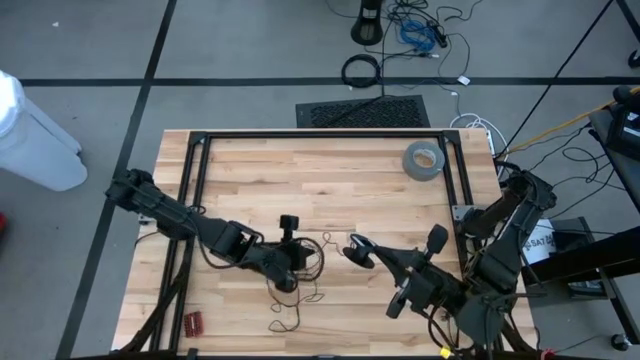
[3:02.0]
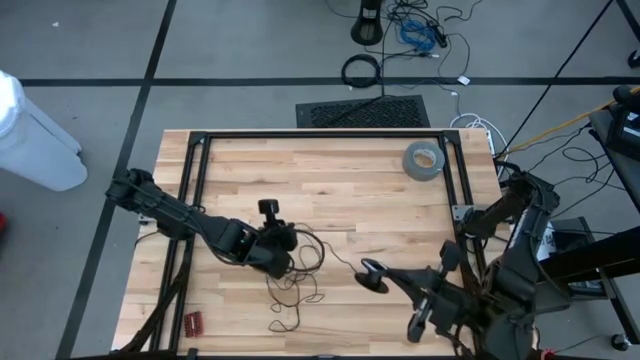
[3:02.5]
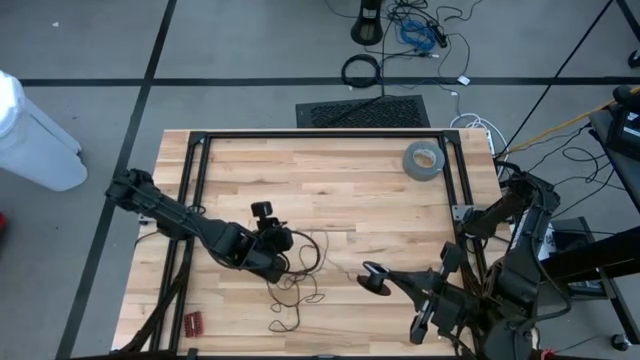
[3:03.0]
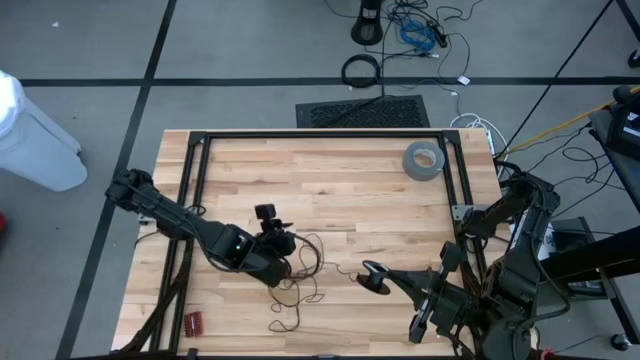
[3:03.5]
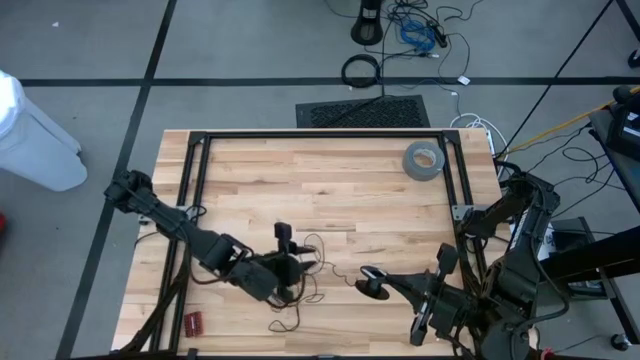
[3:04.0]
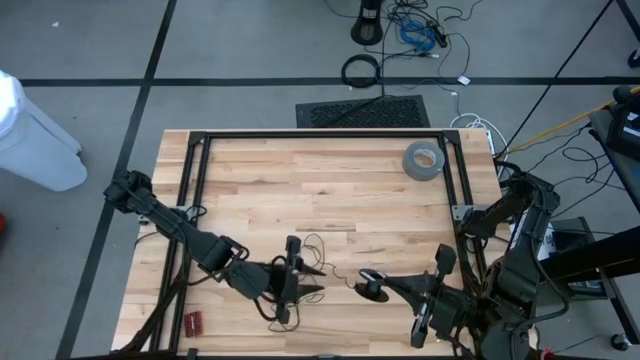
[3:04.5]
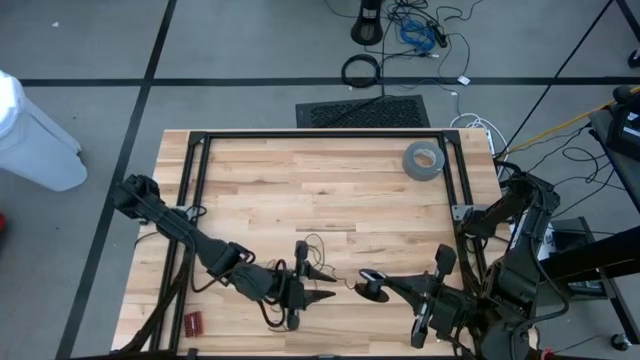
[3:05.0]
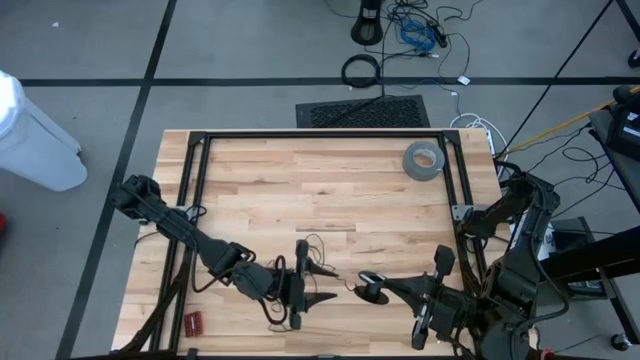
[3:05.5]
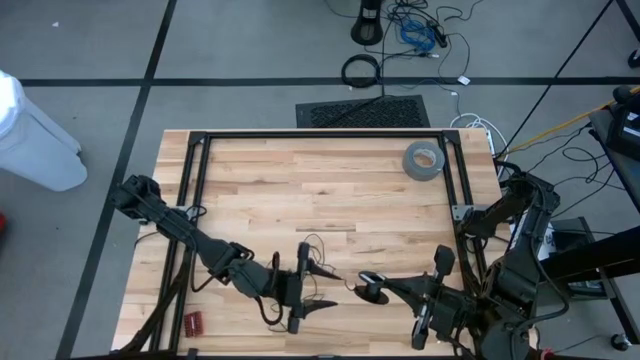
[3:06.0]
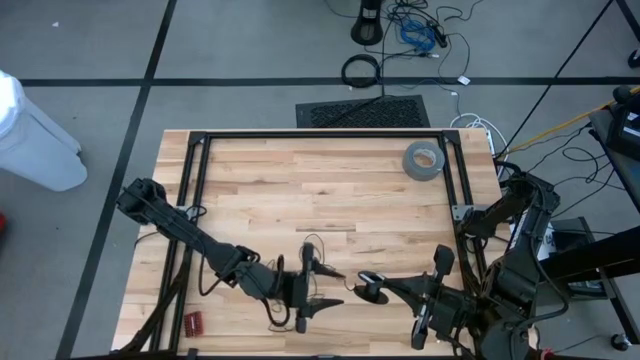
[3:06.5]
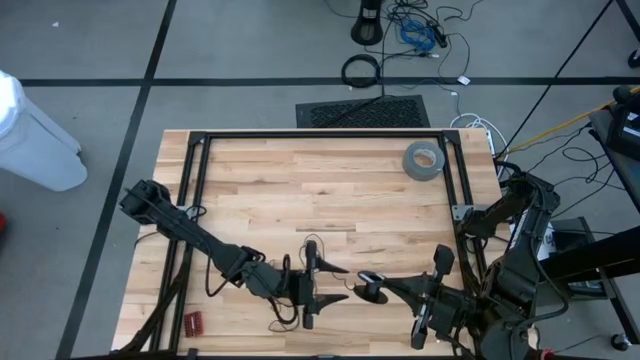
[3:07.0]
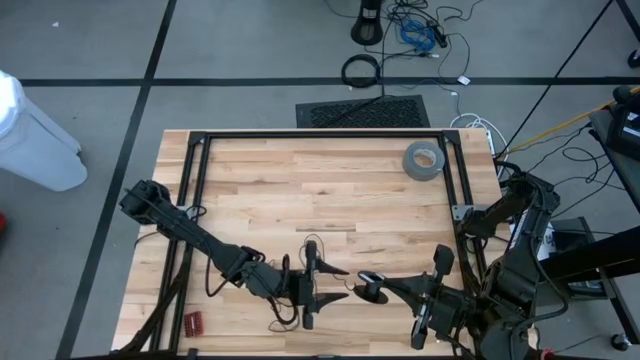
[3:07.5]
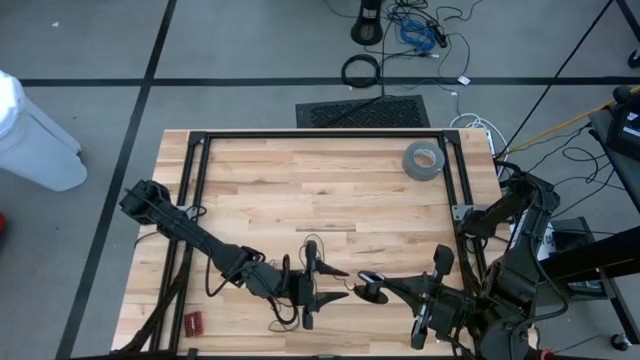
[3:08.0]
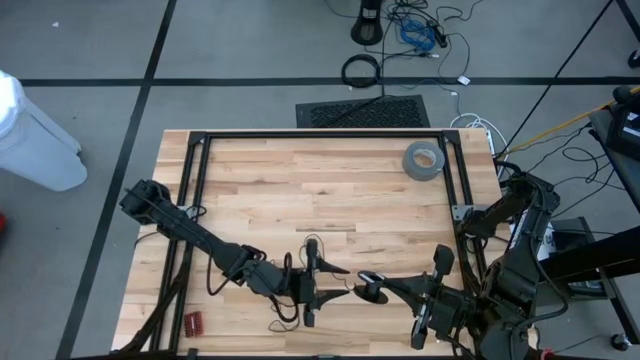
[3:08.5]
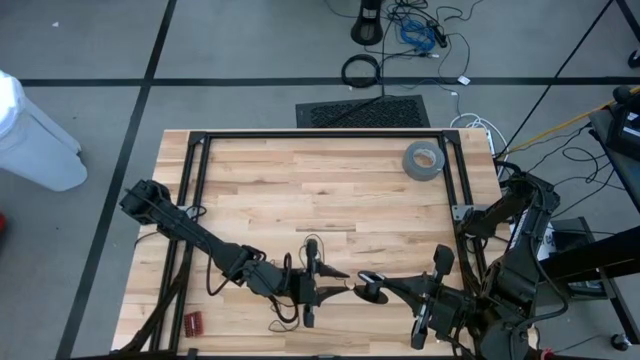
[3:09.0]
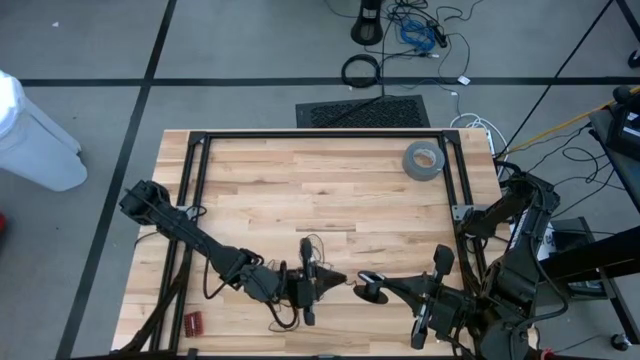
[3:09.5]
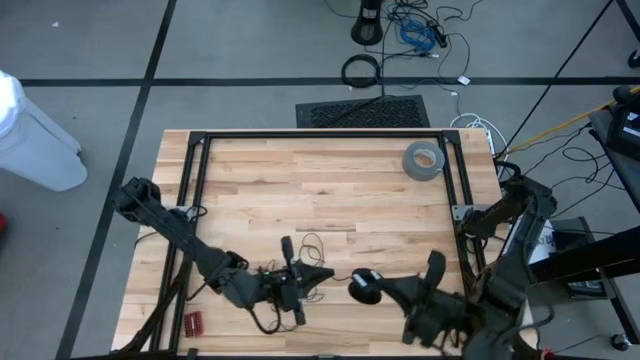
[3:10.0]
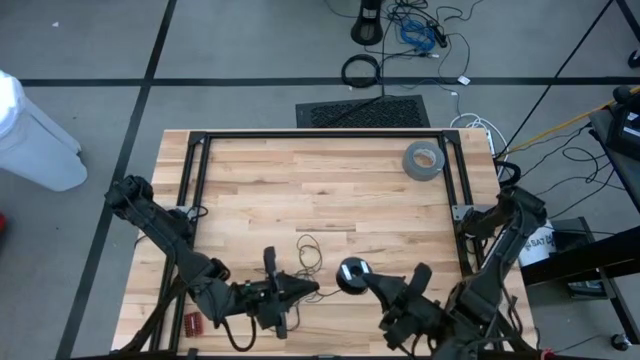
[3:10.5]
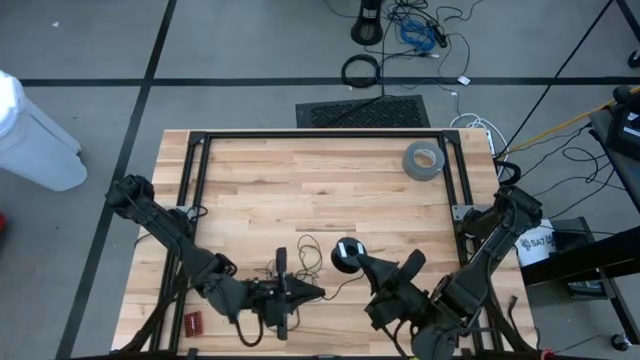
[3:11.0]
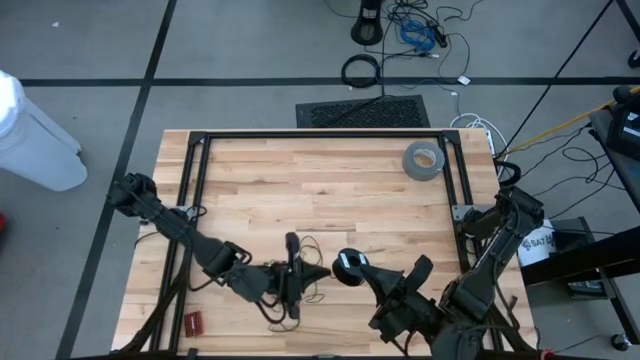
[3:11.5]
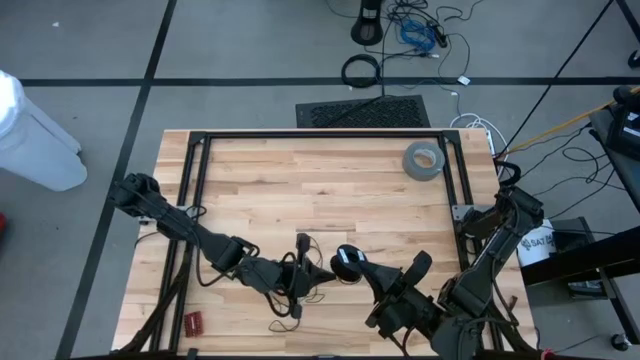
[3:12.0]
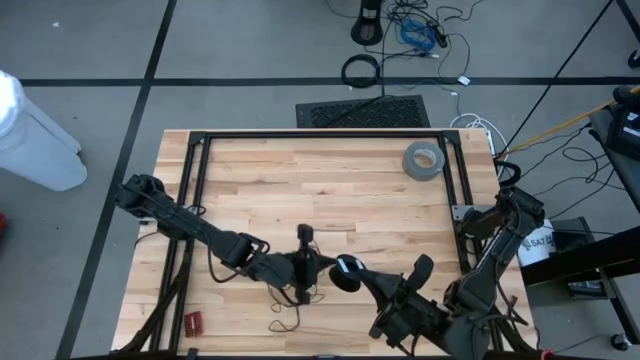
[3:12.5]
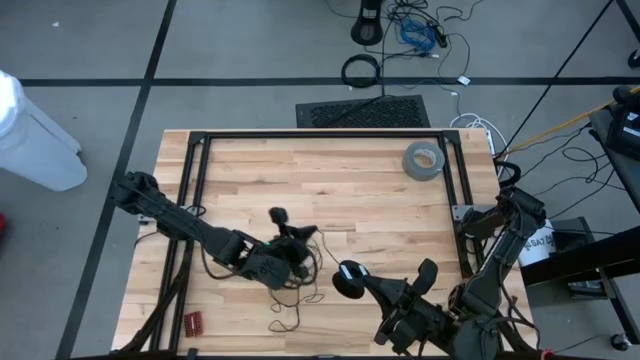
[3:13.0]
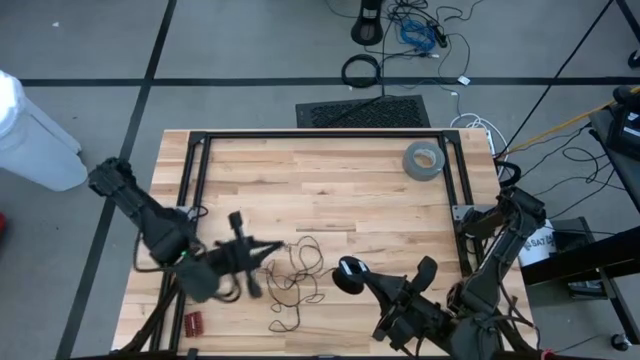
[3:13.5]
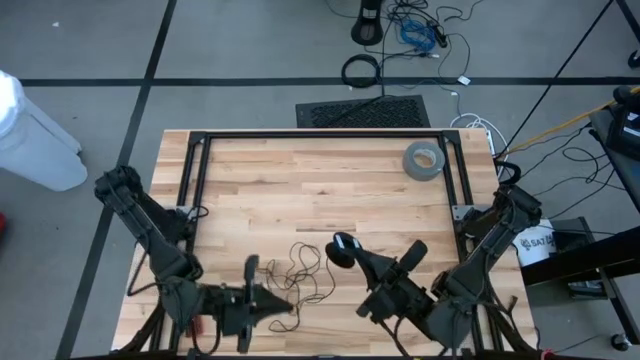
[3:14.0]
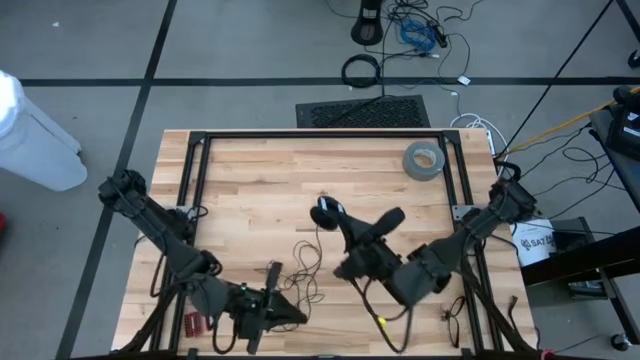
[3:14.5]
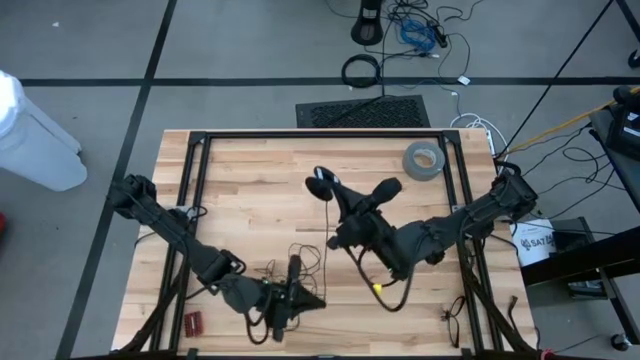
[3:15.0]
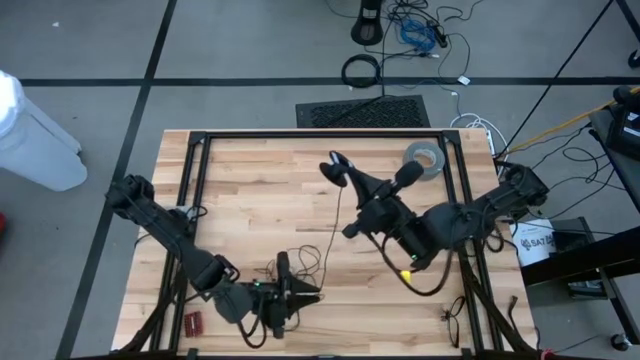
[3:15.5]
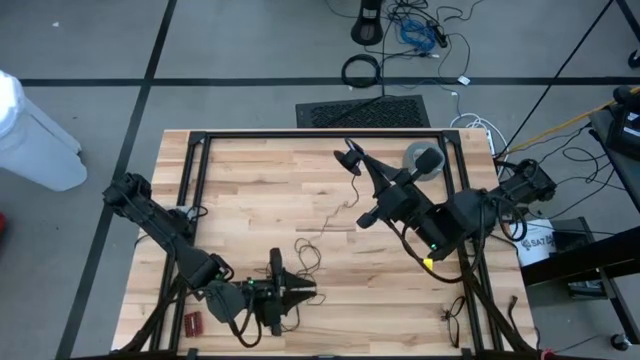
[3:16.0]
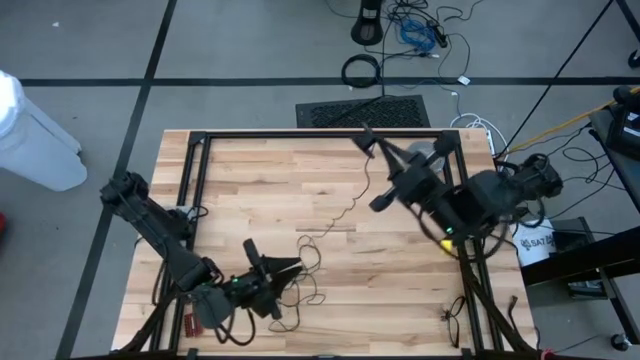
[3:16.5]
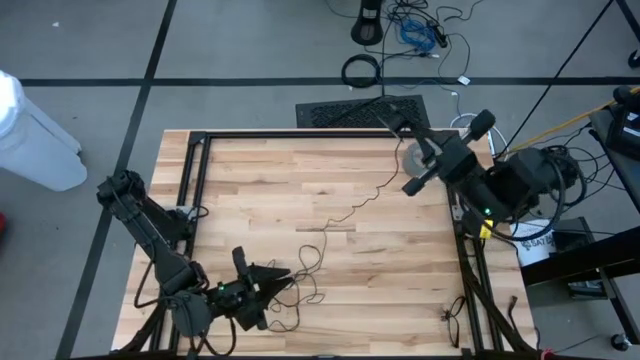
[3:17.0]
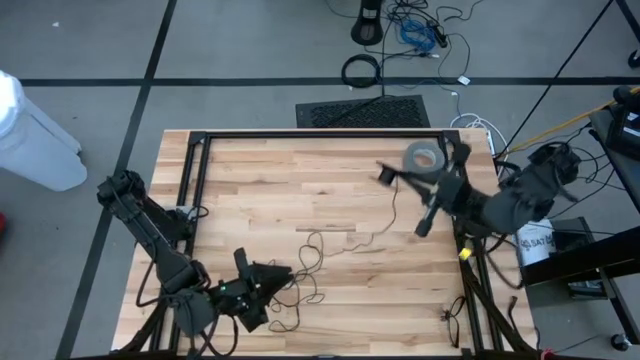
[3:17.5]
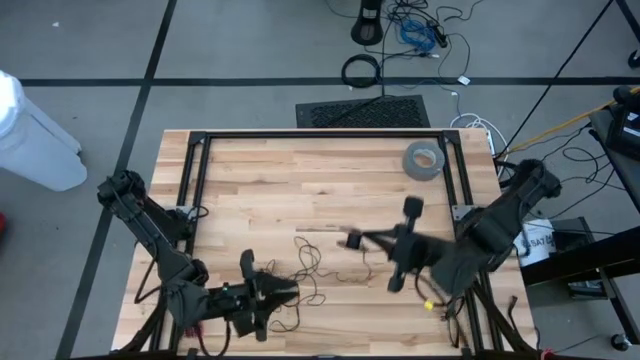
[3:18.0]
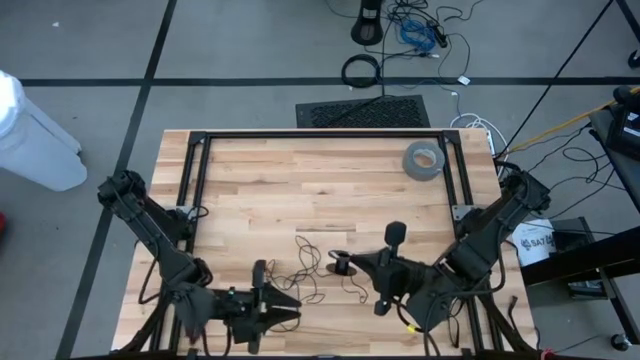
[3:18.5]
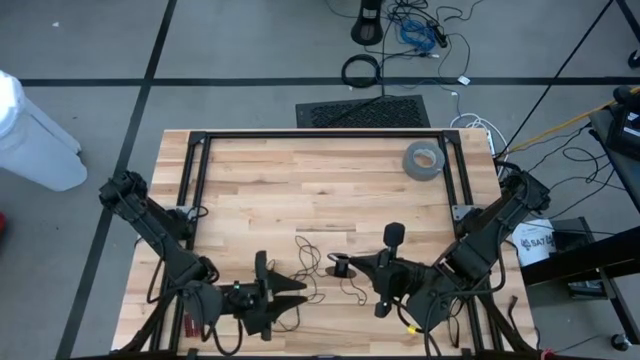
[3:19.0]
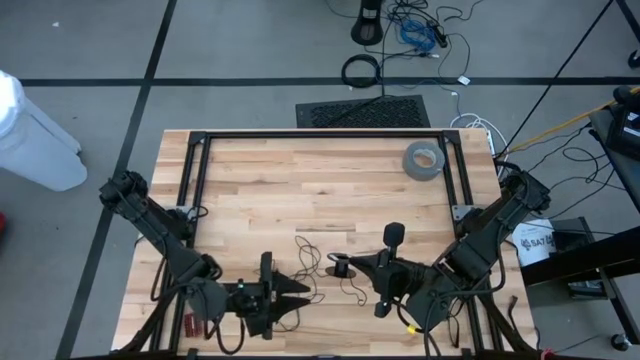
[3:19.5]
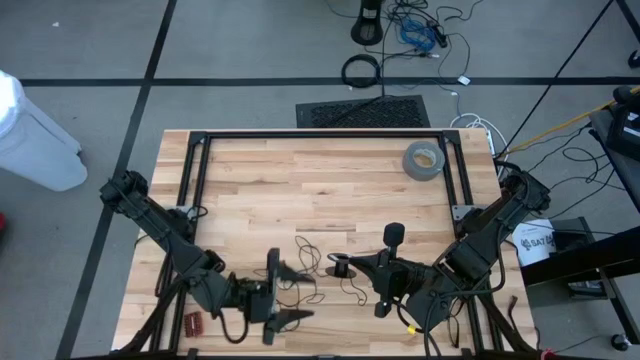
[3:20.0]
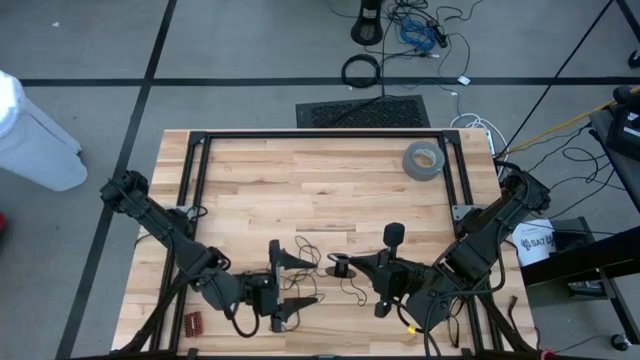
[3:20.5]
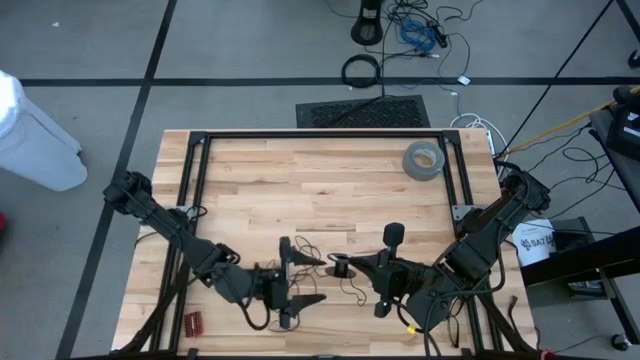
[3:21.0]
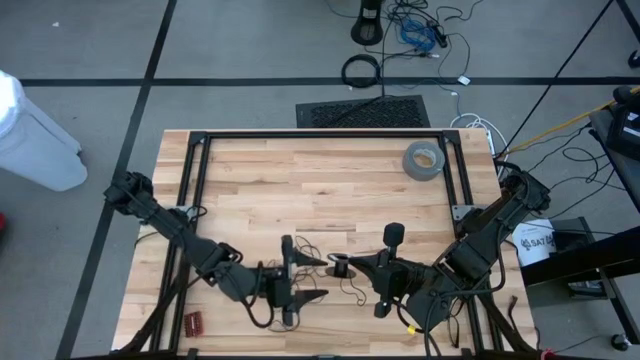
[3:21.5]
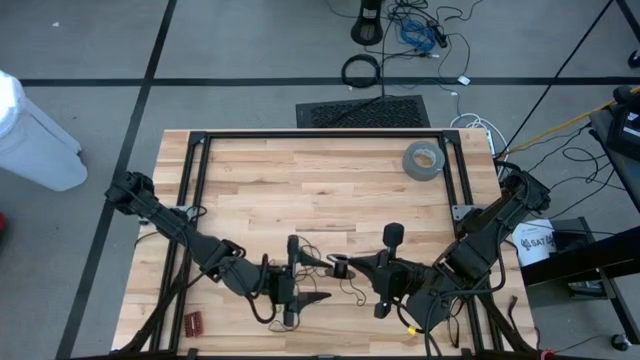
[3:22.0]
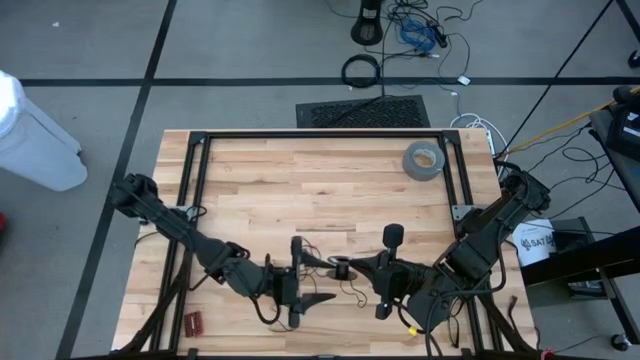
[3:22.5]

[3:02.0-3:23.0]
Task: Coil cords
Uncoil the black wire from the spool
